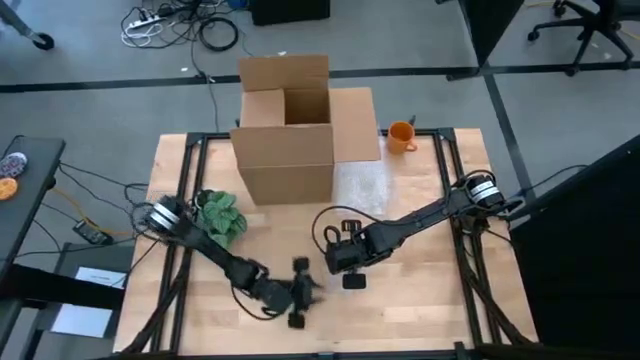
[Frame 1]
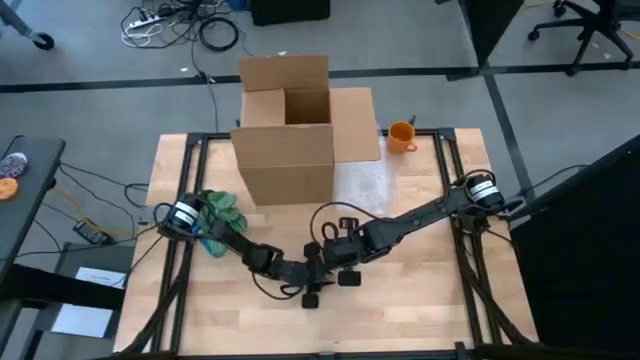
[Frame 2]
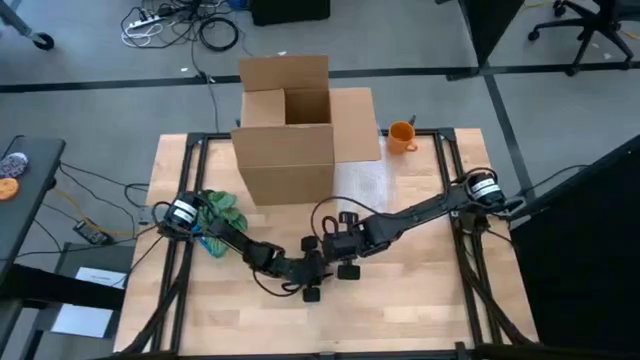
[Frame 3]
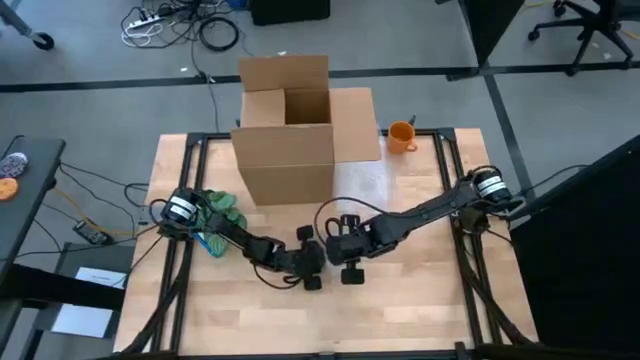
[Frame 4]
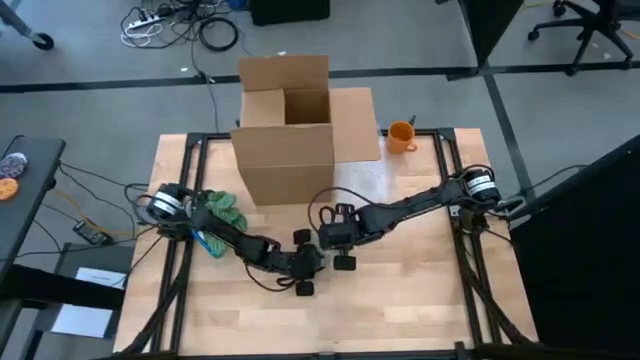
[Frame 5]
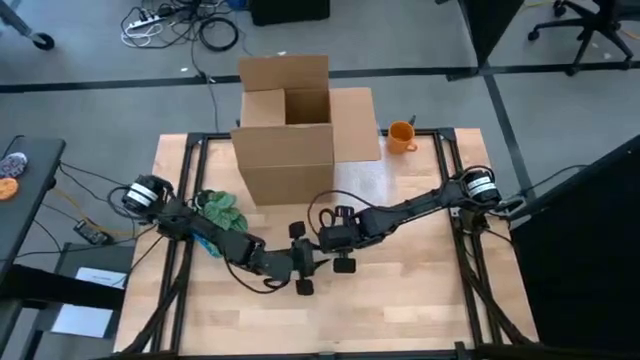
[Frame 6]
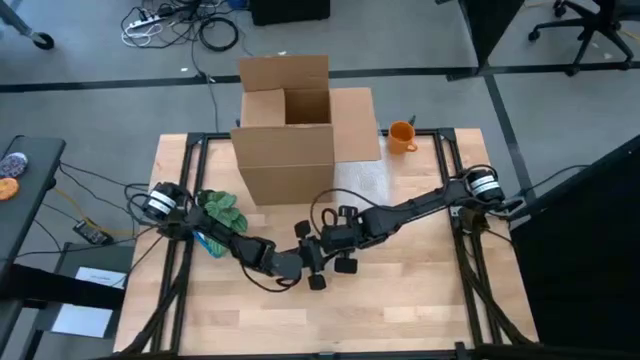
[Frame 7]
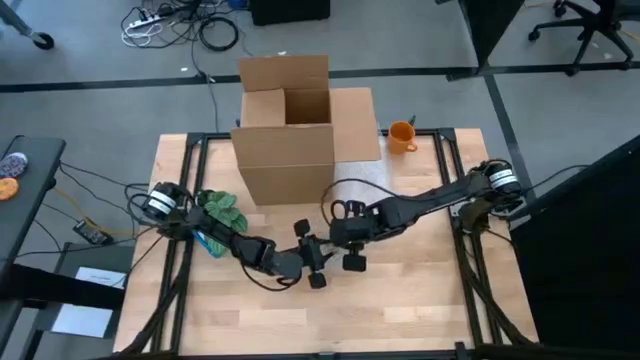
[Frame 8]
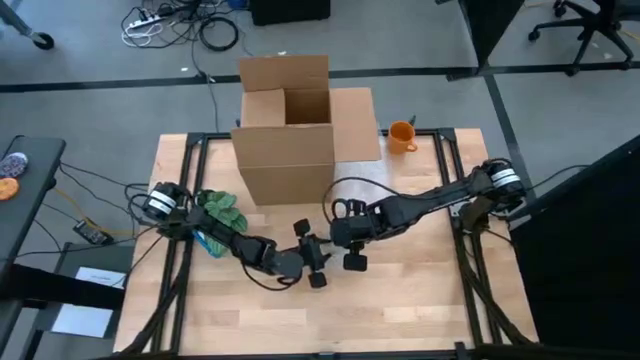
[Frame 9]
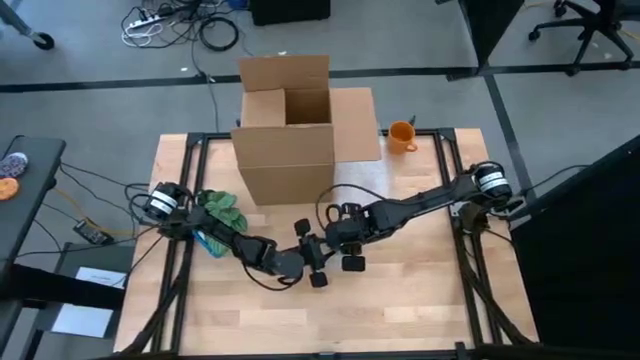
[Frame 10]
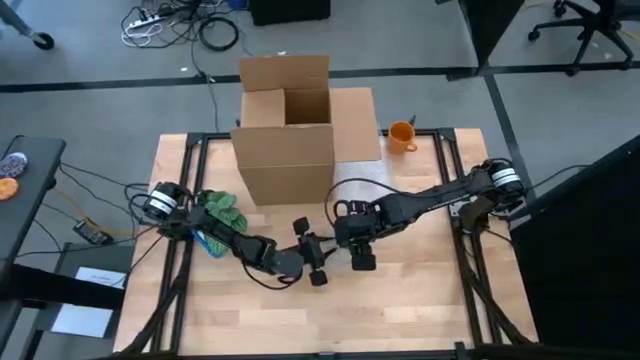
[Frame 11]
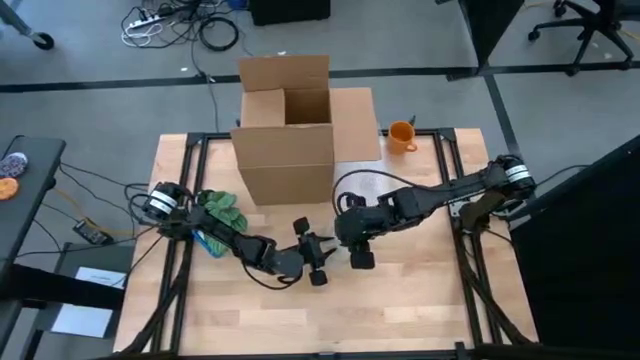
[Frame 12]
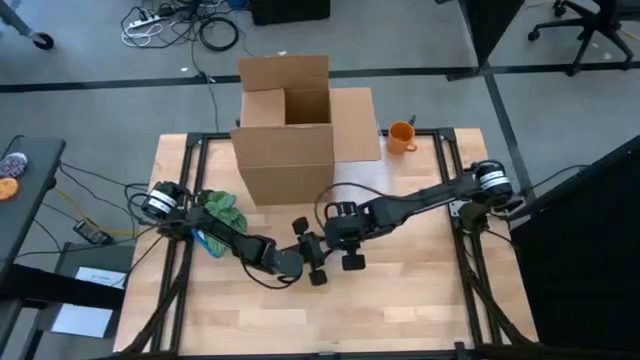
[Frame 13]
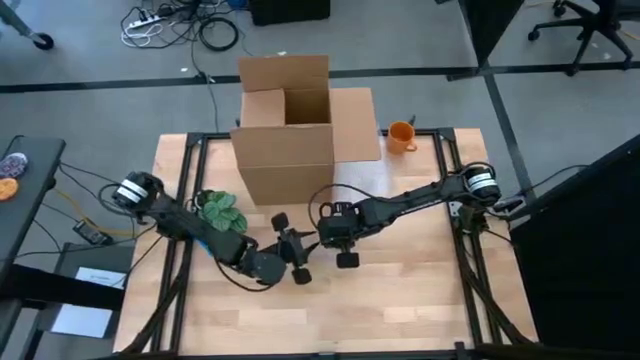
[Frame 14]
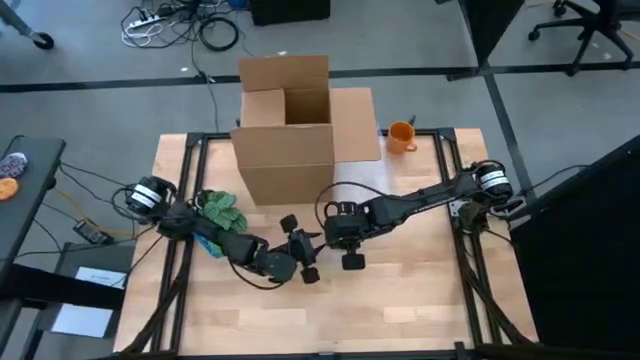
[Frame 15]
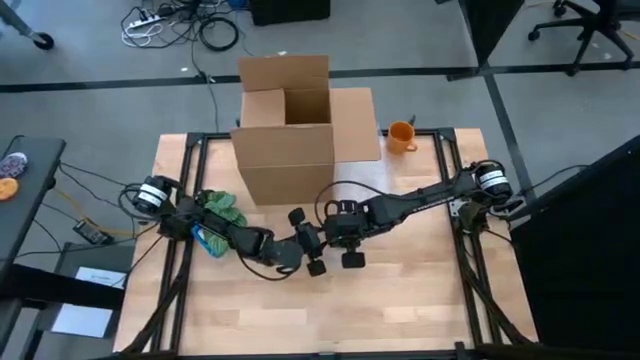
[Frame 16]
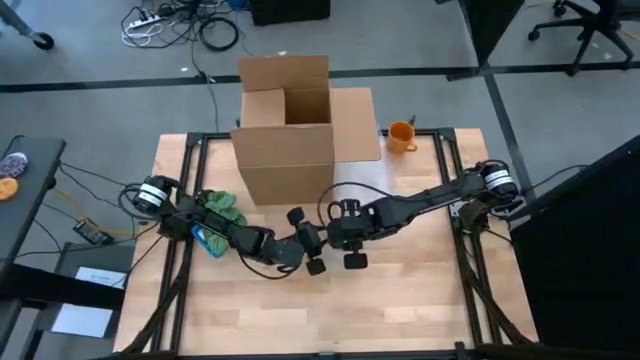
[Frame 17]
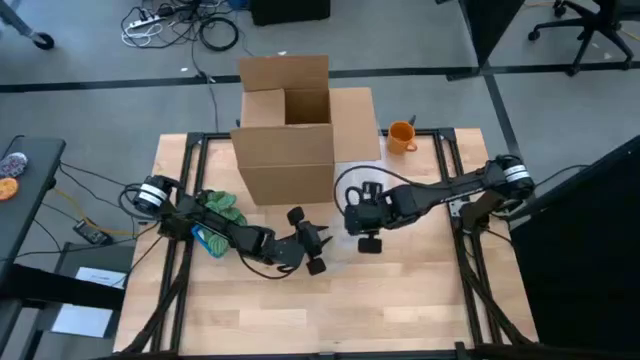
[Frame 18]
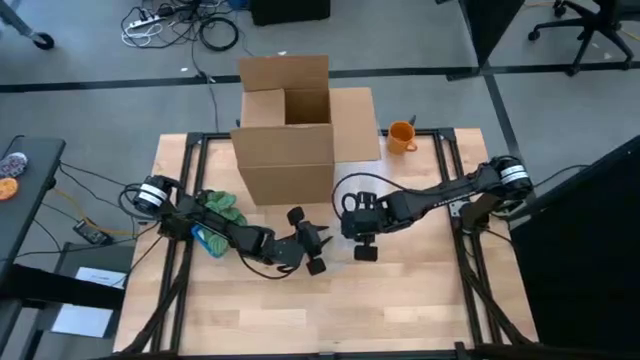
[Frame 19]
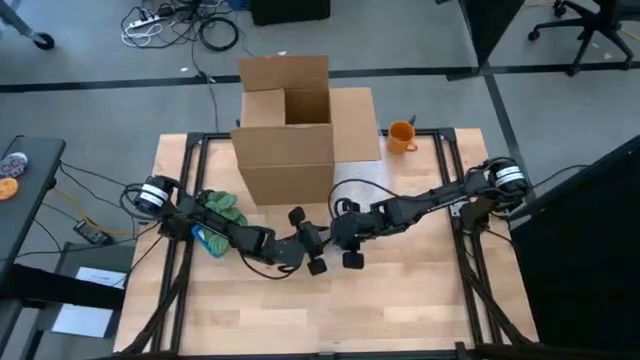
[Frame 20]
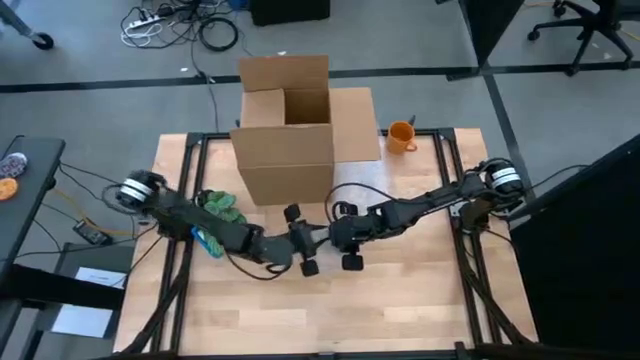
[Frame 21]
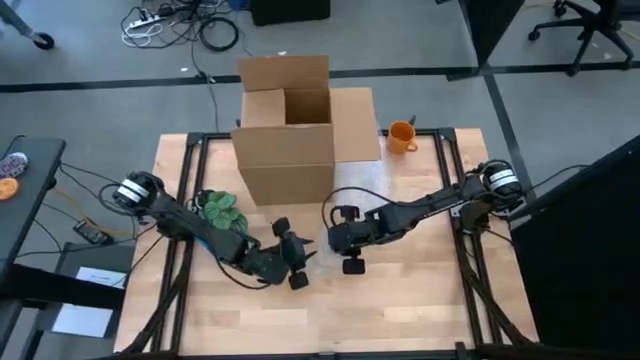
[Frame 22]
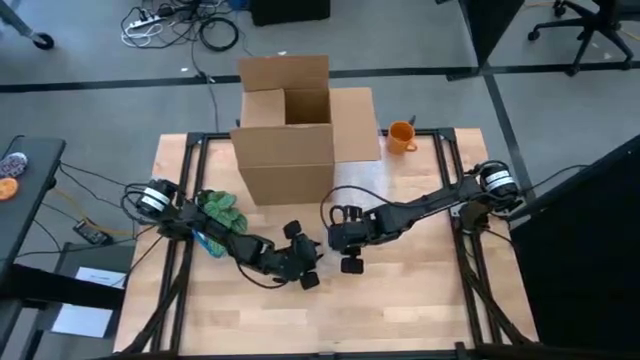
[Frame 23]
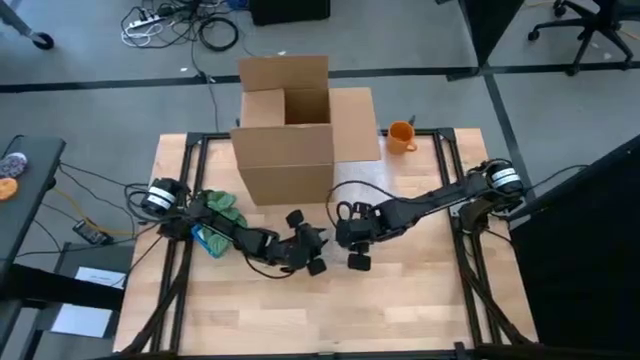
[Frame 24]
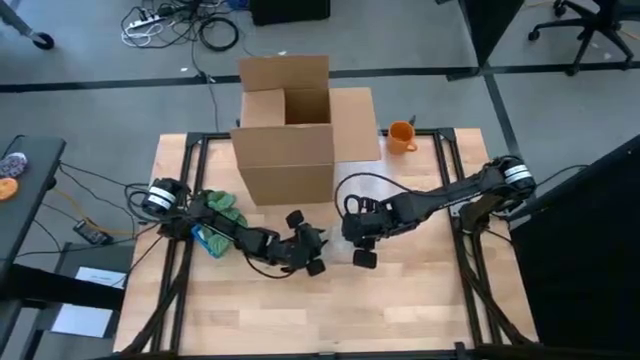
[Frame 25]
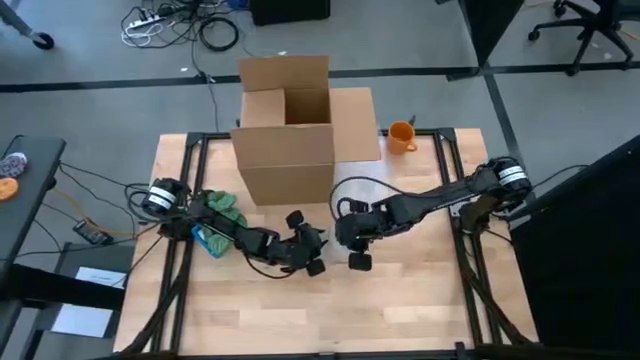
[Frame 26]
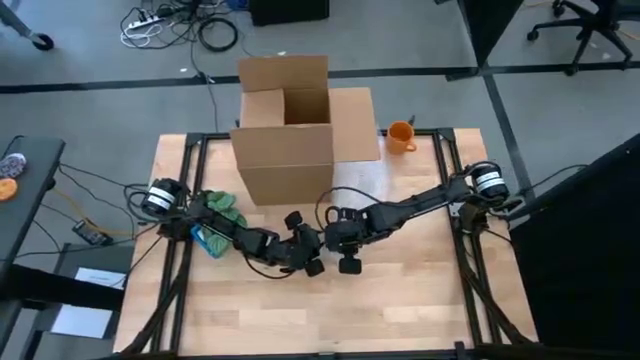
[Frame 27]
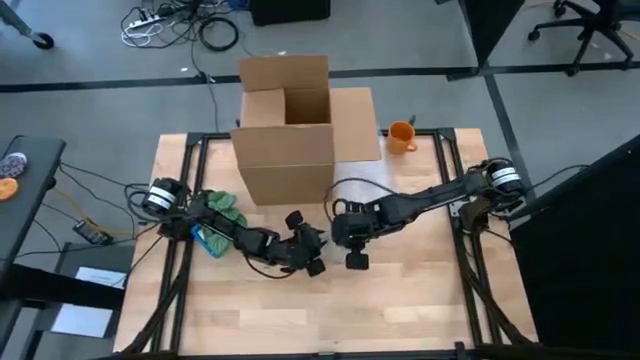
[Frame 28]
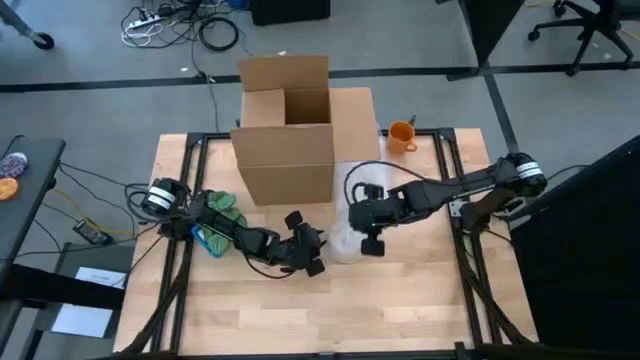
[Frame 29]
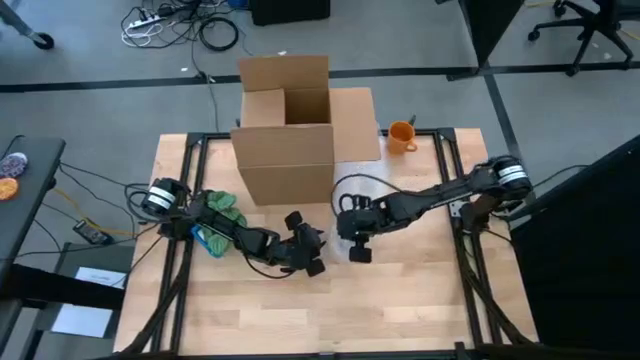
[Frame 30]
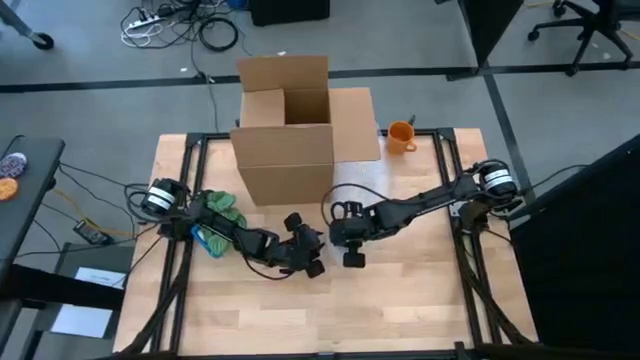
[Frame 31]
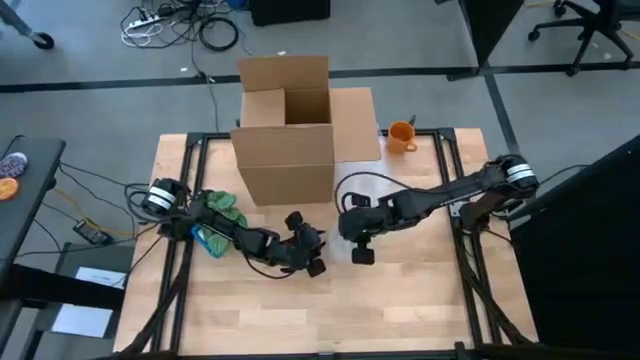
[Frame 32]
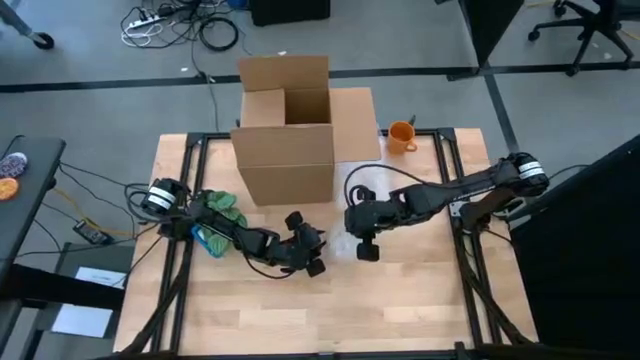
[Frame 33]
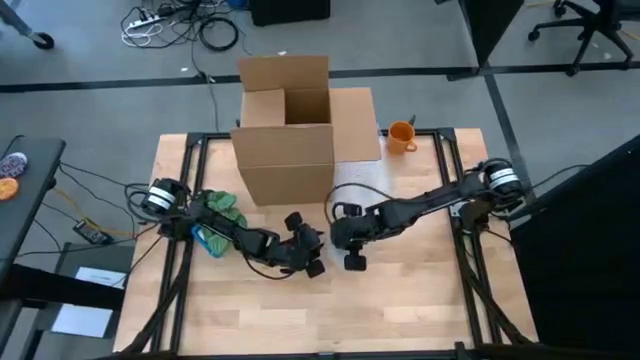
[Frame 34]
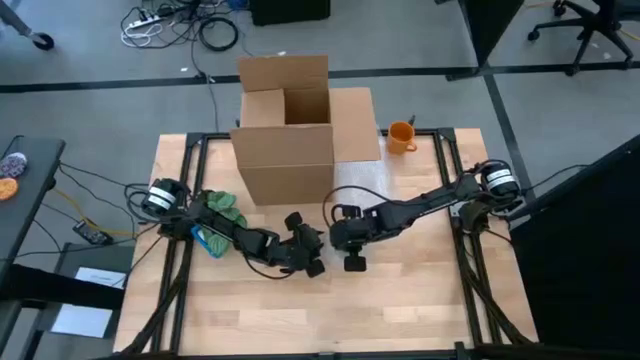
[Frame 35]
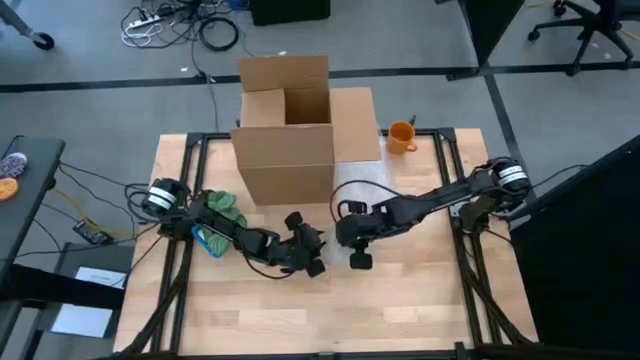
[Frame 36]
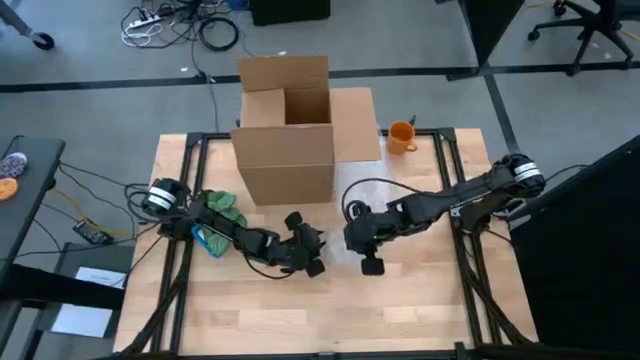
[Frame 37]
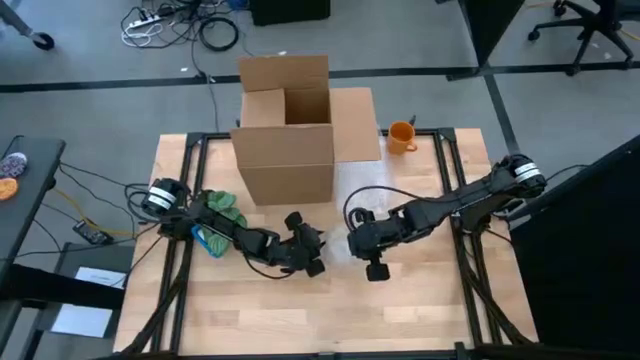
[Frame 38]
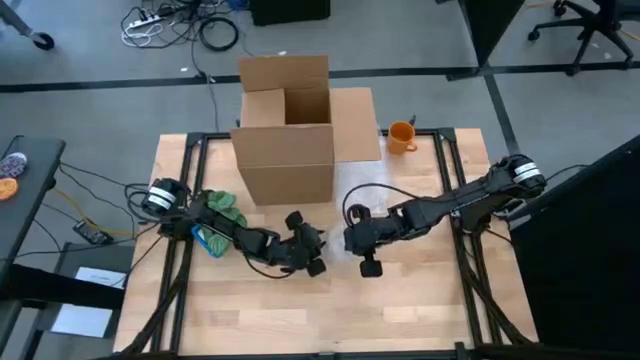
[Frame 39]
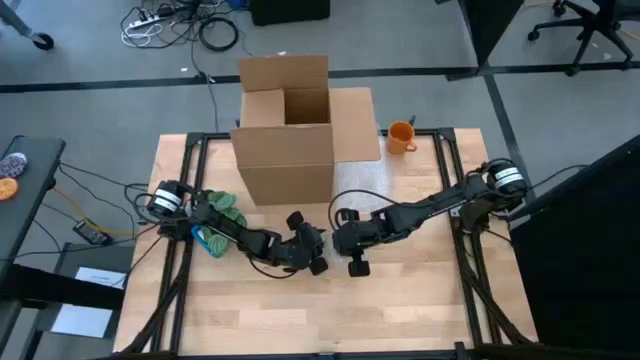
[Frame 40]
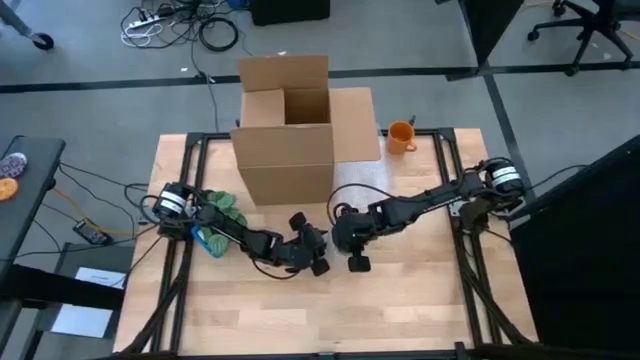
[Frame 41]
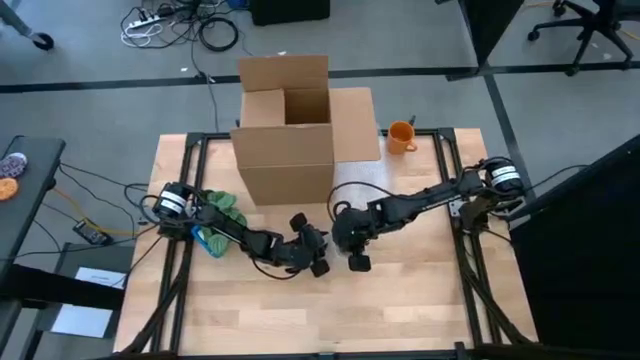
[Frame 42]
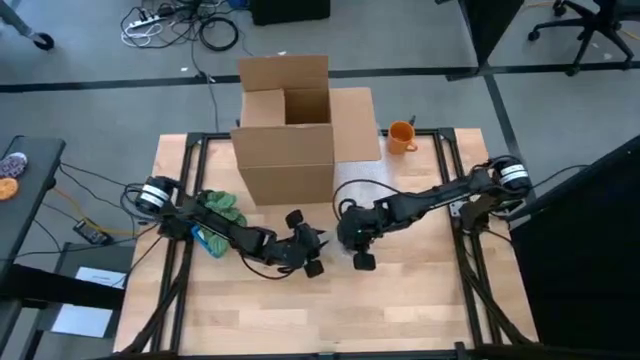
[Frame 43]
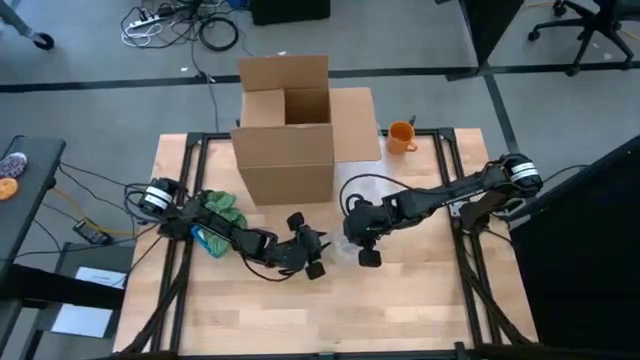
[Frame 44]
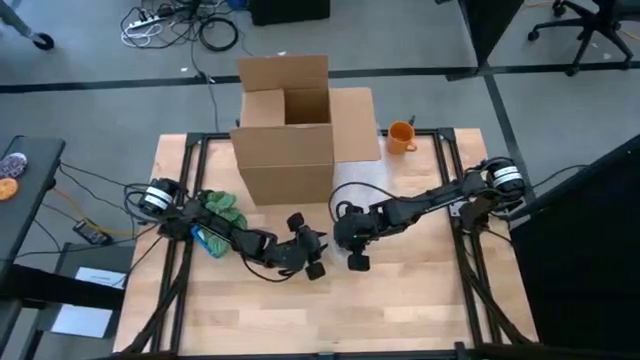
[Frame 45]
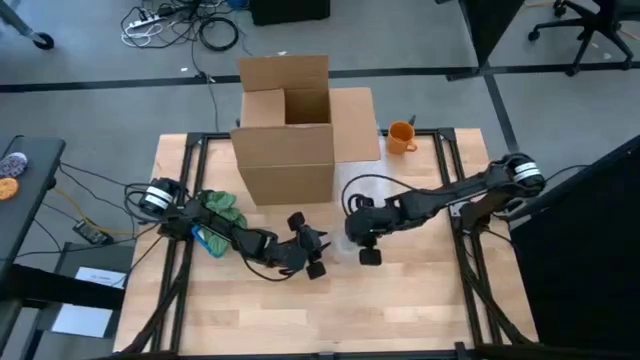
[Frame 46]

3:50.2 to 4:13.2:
Task: wrap mug
Wrap the yellow mug with the bubble wrap
